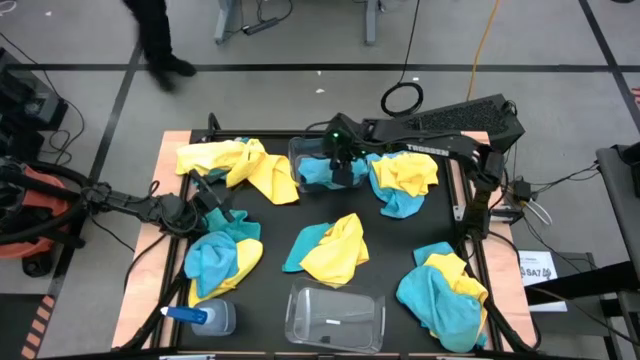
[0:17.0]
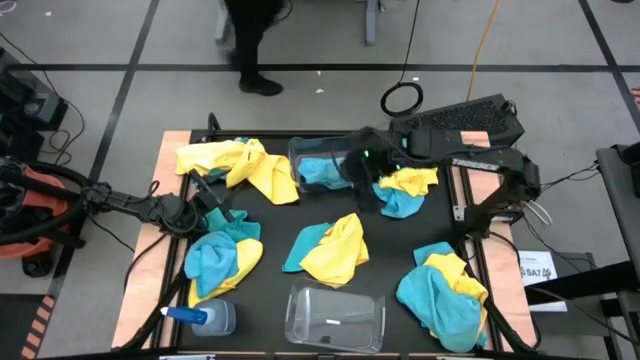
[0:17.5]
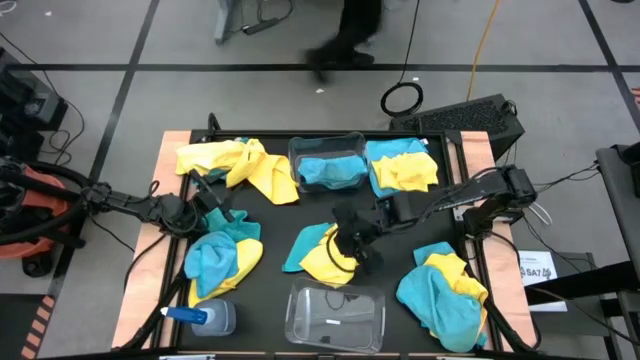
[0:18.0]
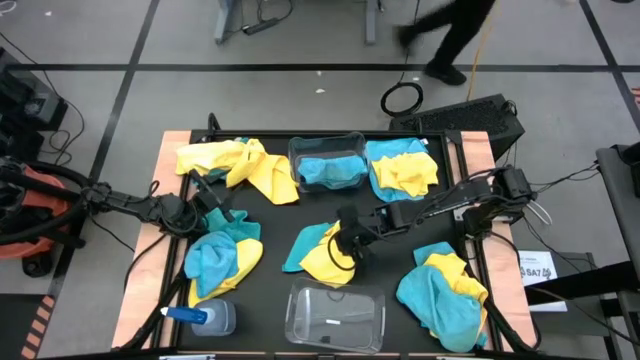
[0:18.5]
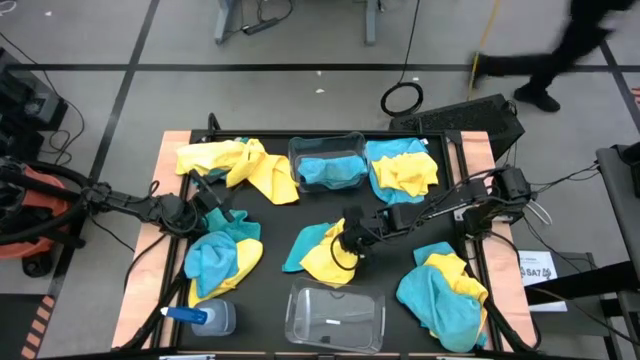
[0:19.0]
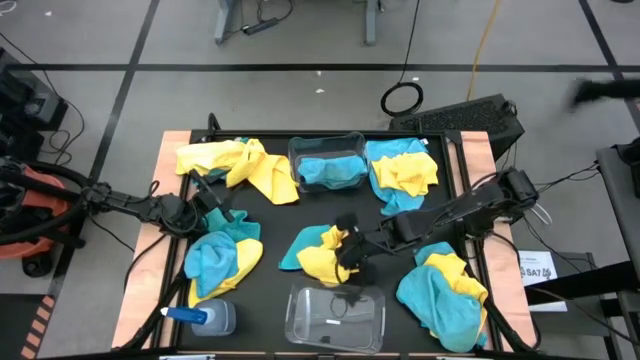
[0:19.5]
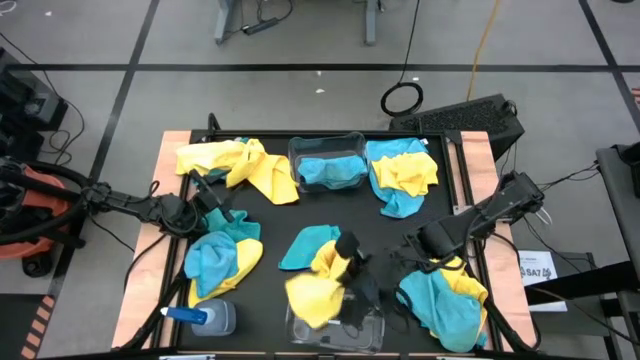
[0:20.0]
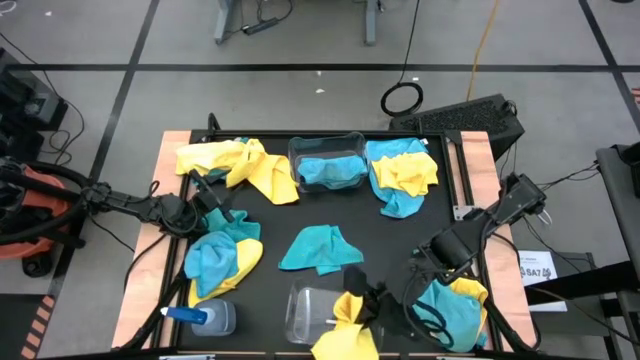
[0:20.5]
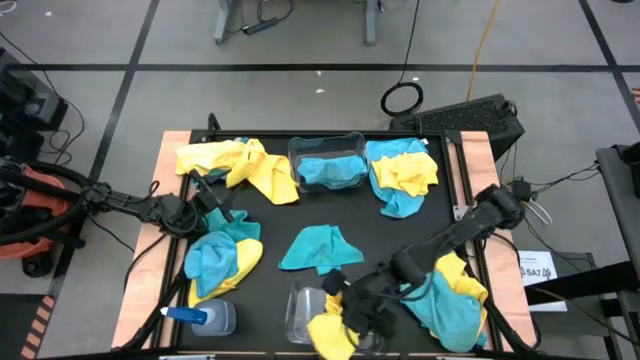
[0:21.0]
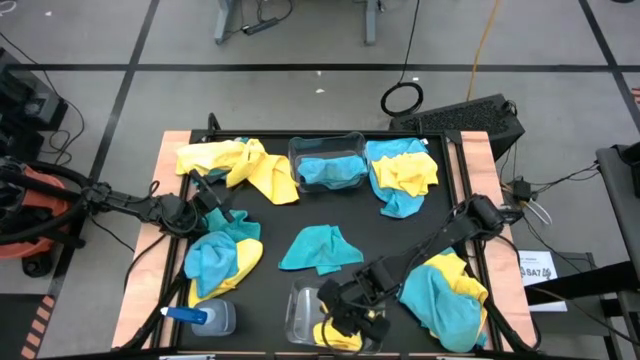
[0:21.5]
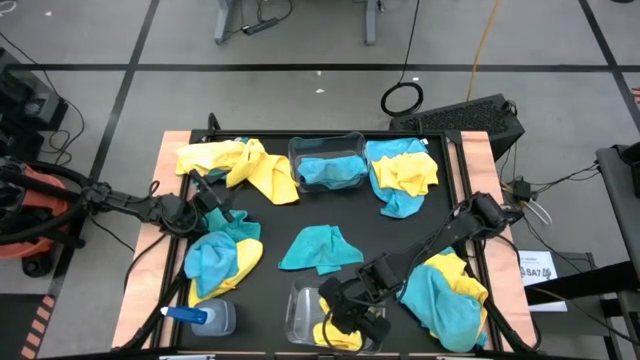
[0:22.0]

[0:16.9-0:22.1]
Task: Sort microfiber towel by color & place in baskets
Put the yellow microfiber towel into the bottom transparent bin

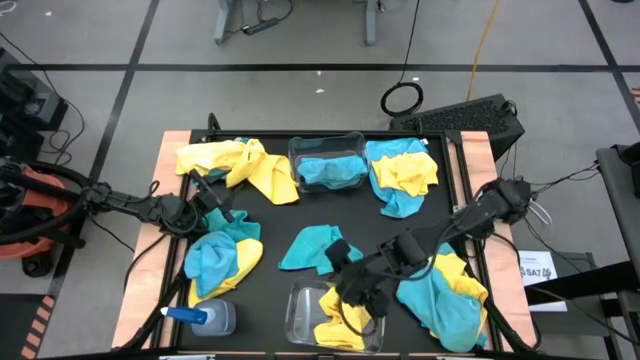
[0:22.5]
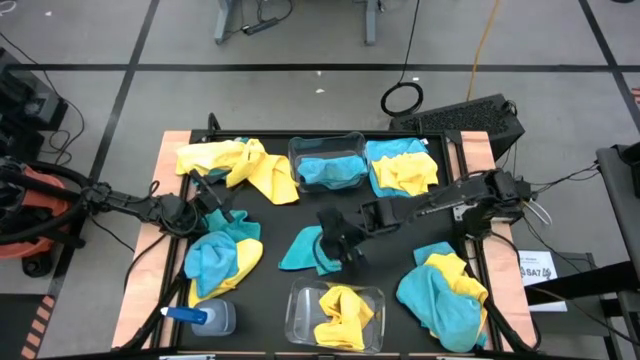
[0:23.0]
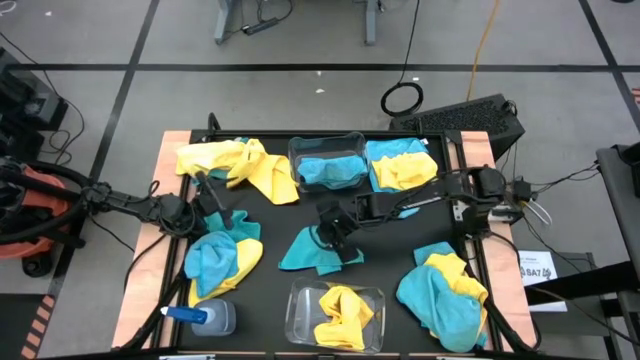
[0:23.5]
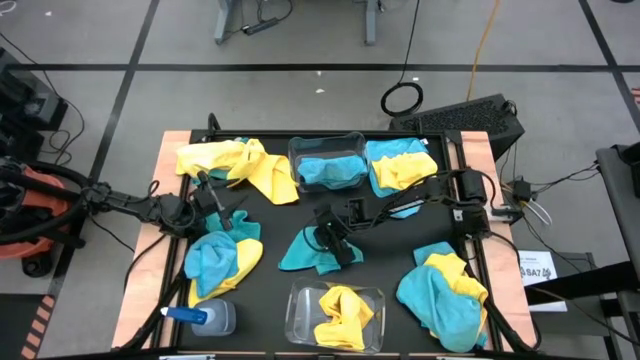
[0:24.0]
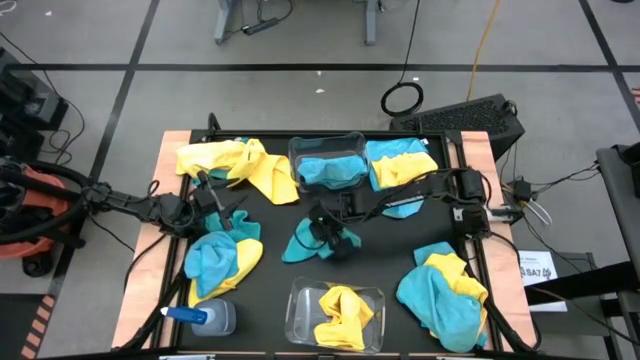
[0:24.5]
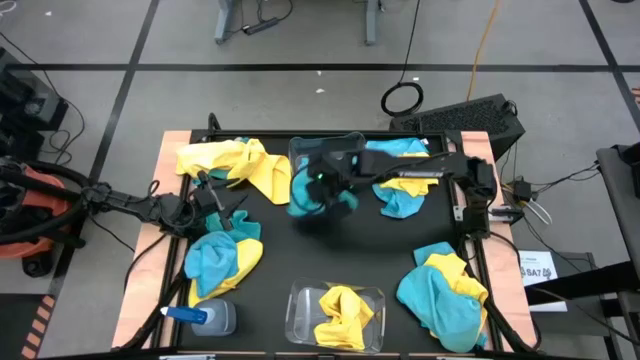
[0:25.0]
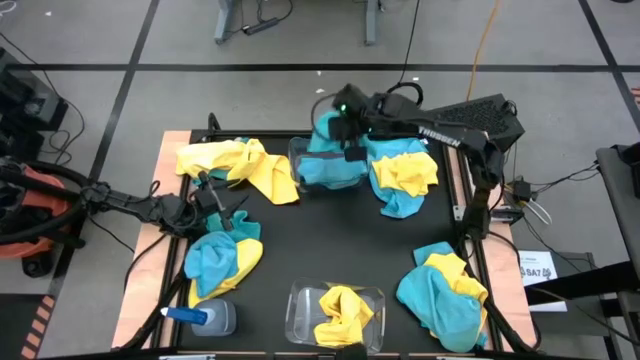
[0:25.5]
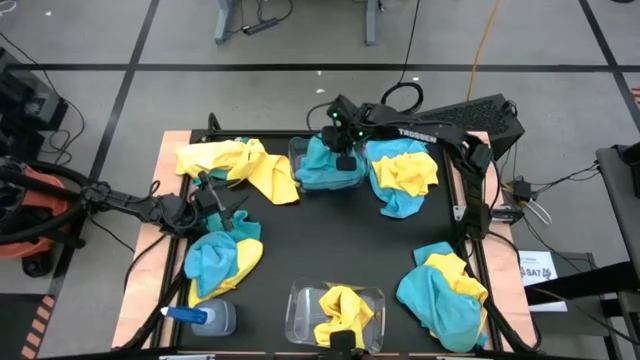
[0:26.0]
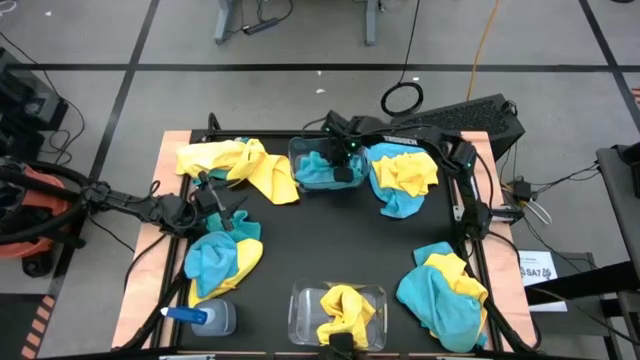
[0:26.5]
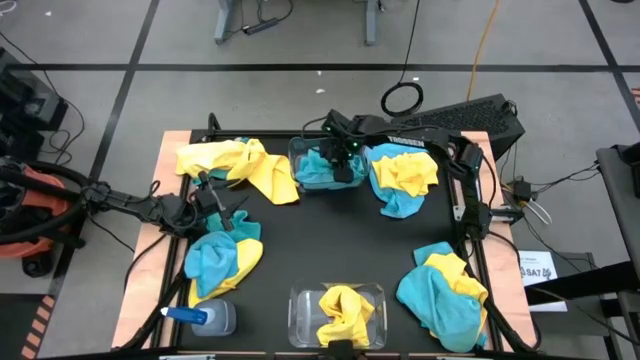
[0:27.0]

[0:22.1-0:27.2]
Put the blue microfiber towel into the top transparent bin

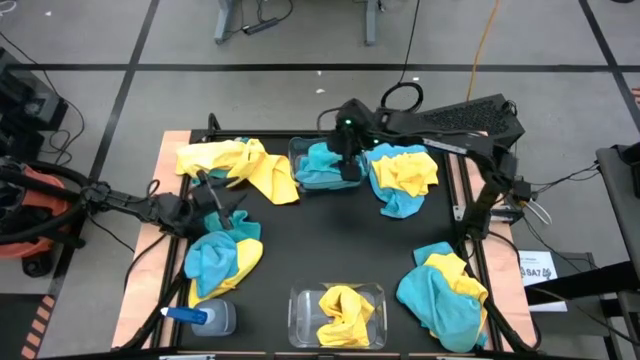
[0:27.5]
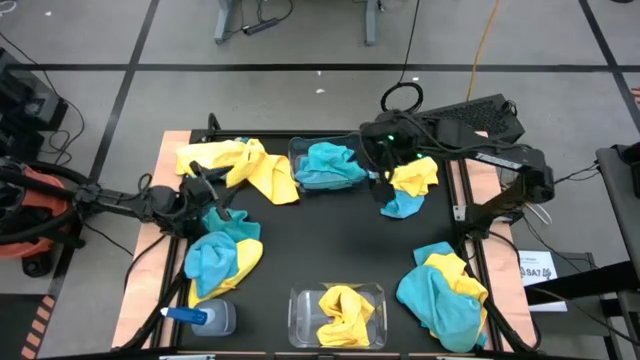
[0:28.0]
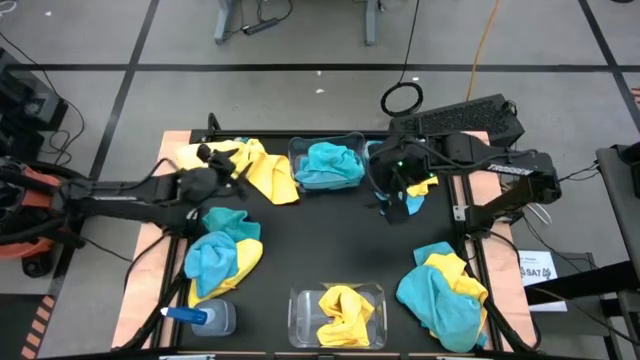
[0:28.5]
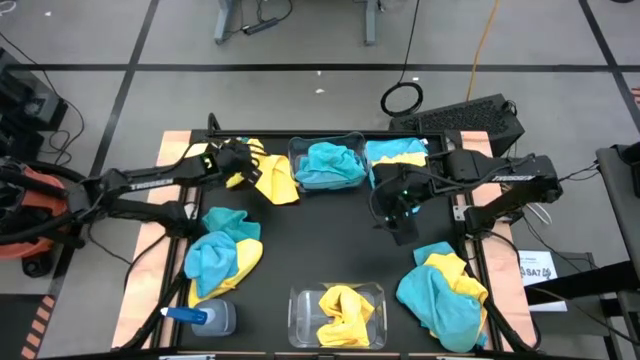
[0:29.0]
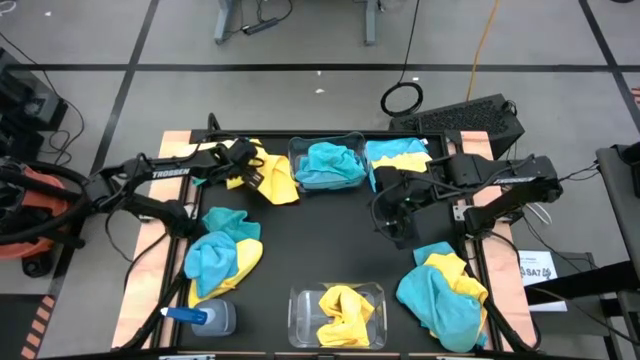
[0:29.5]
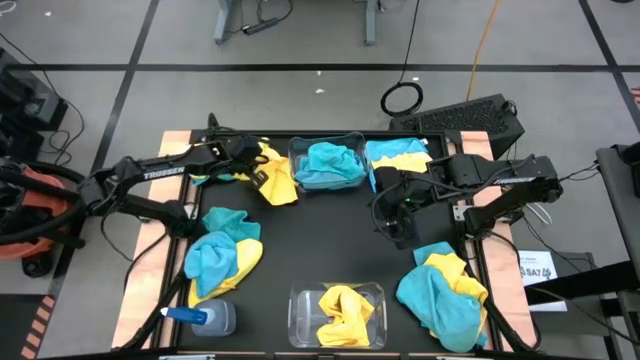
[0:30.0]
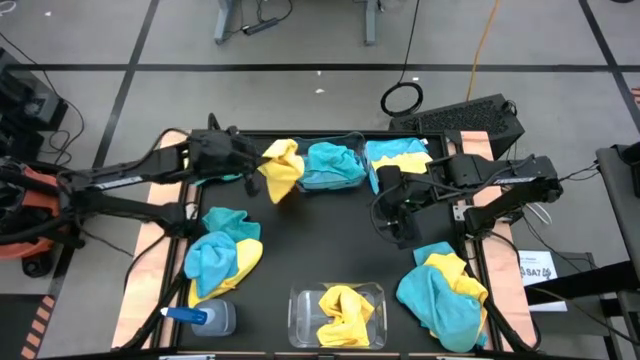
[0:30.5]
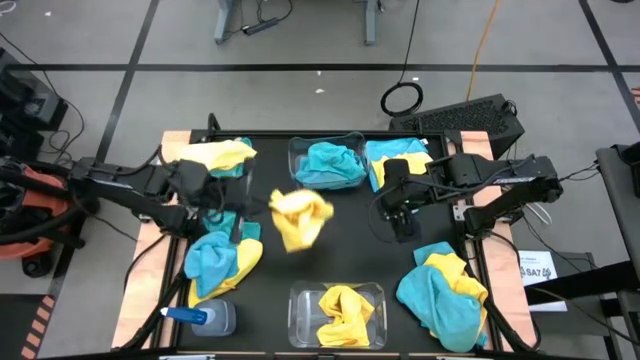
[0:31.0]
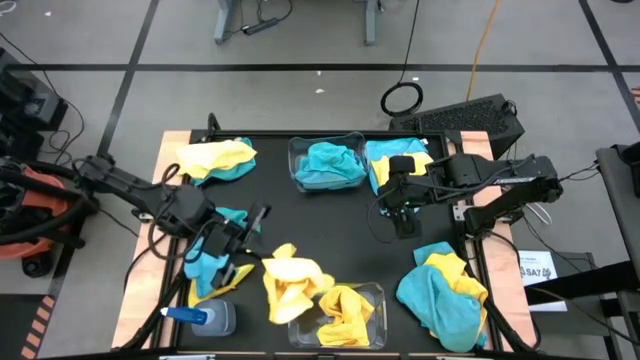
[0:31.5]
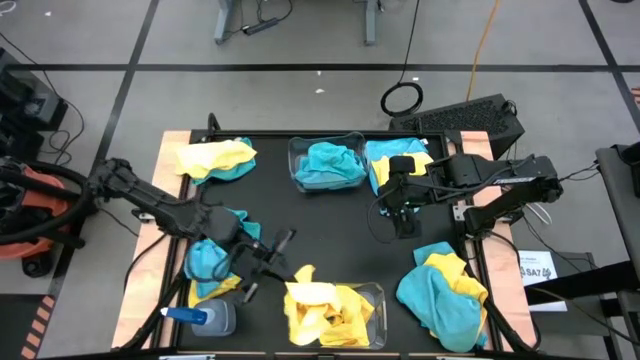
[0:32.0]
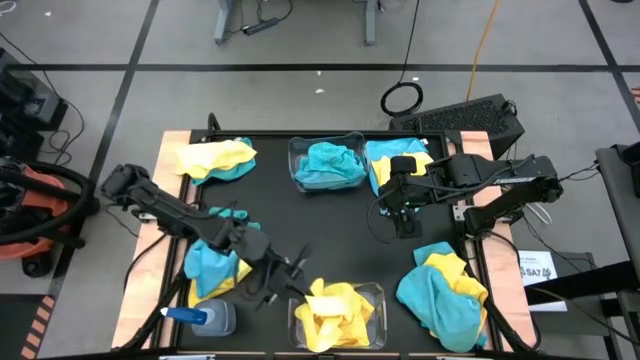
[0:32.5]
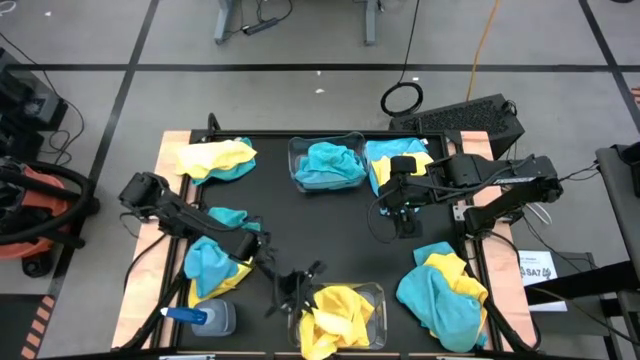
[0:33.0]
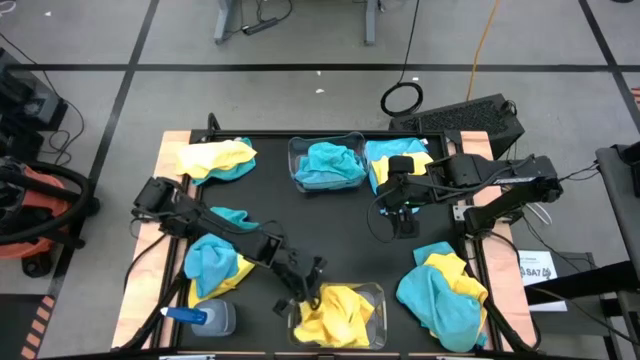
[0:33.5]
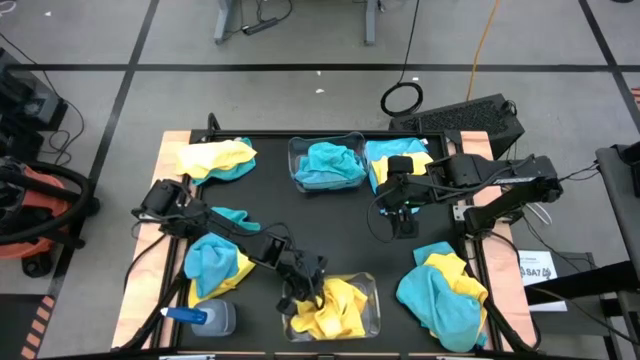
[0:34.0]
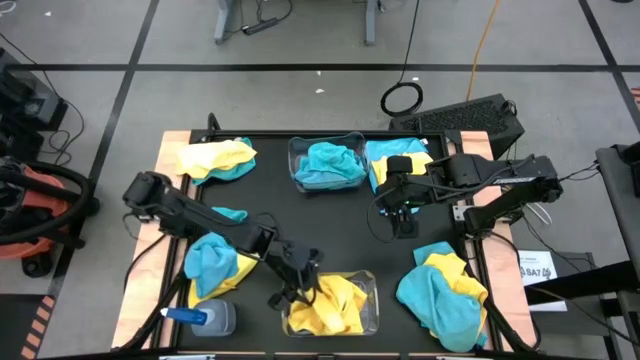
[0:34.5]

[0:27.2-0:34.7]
Put the yellow microfiber towel into the bottom transparent bin

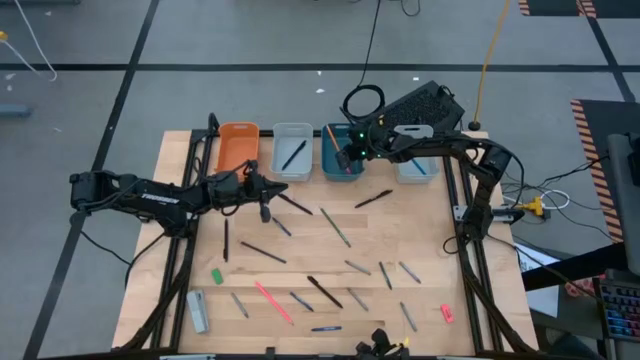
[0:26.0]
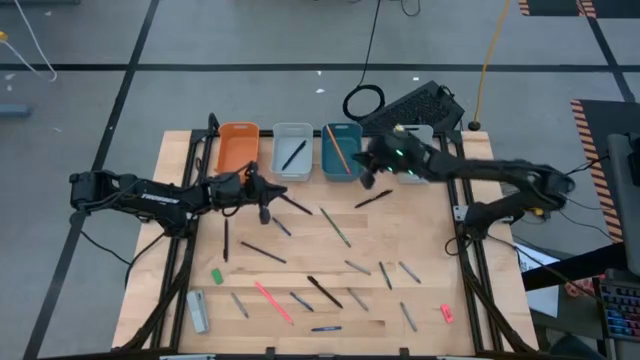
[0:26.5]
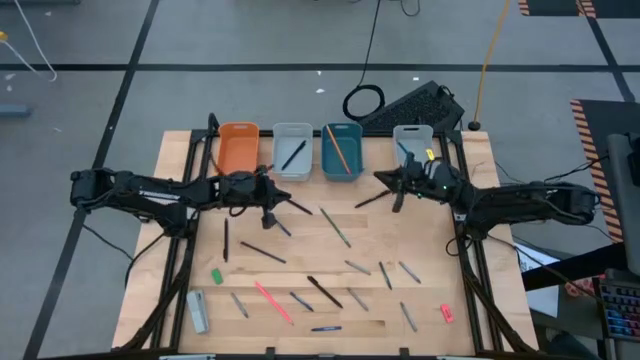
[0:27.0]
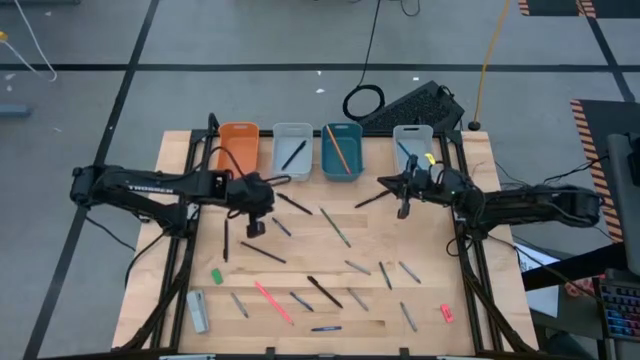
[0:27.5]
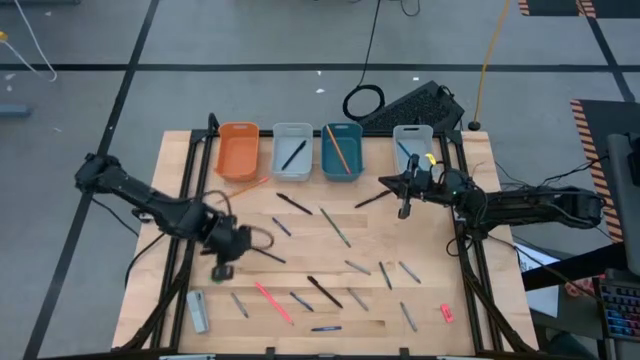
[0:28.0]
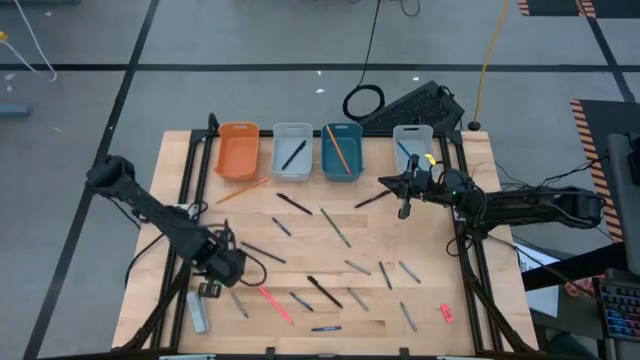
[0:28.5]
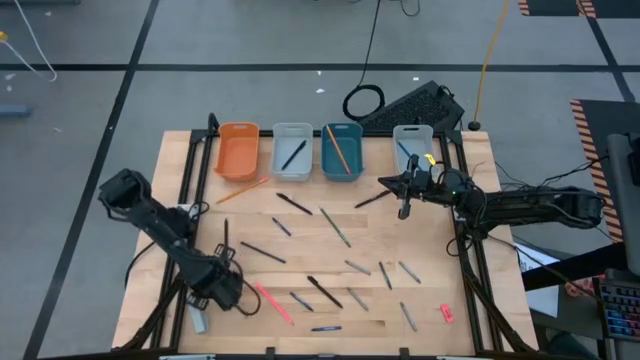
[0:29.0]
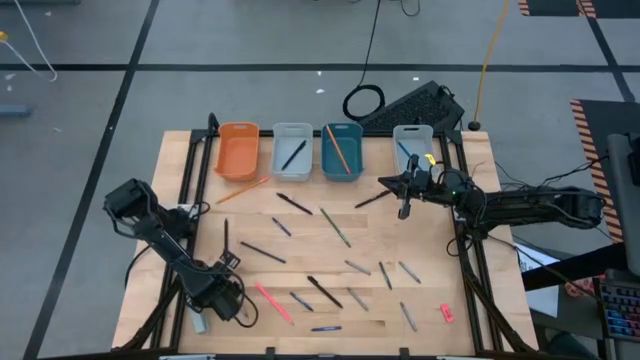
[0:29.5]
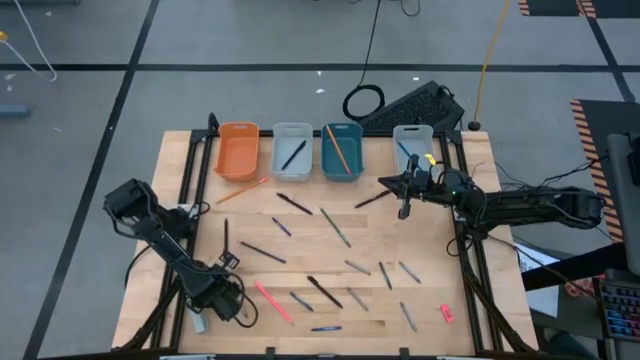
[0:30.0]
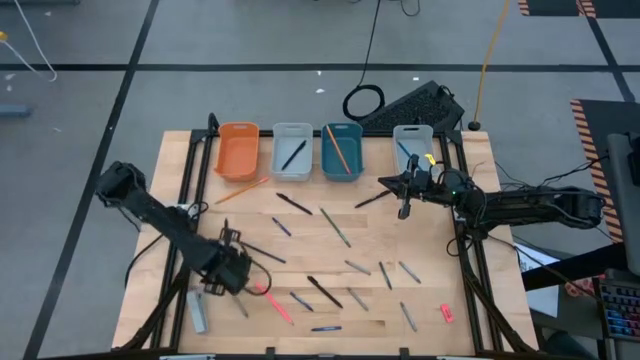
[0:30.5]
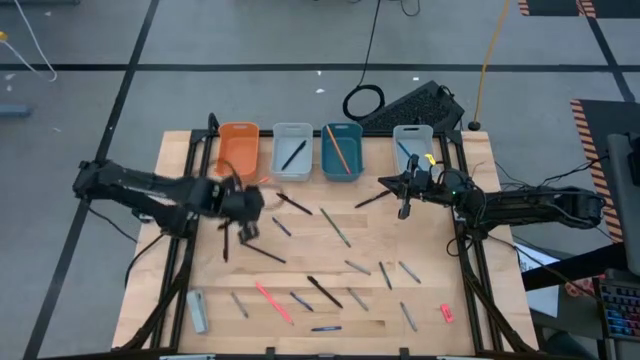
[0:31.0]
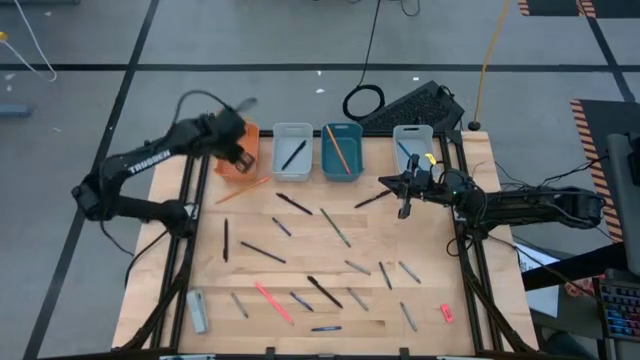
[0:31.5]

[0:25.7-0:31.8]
Task: Sort crayons/erasers/pens/pencils in bins
Put the green eraser into the orange bin
